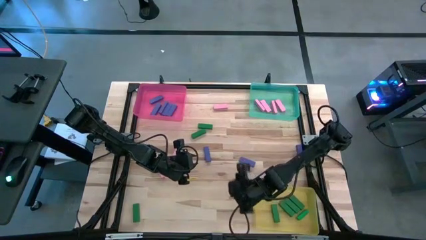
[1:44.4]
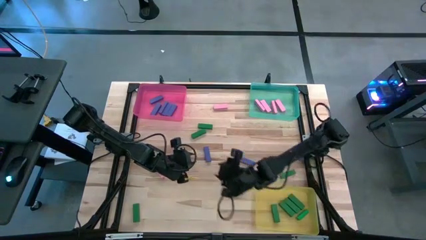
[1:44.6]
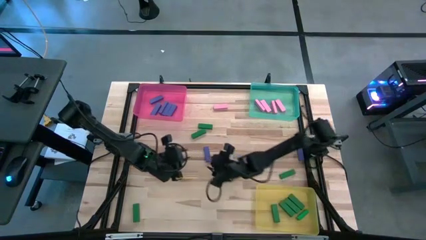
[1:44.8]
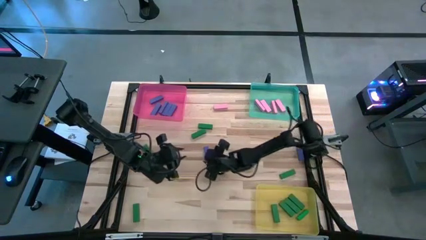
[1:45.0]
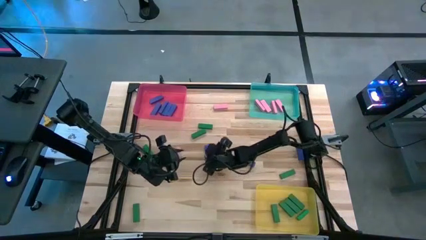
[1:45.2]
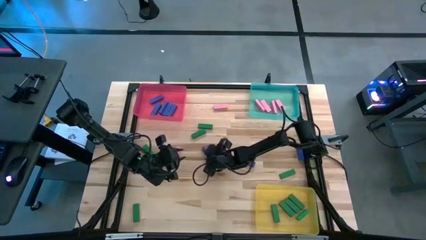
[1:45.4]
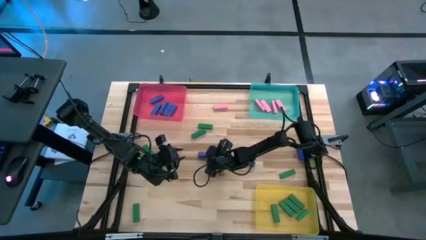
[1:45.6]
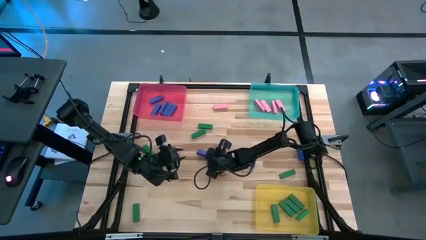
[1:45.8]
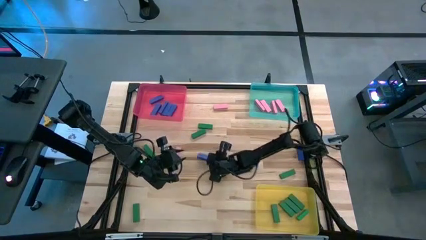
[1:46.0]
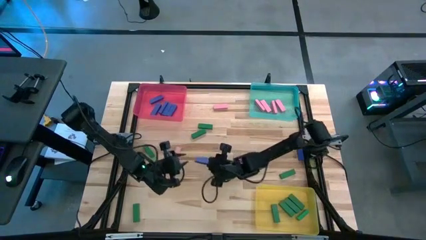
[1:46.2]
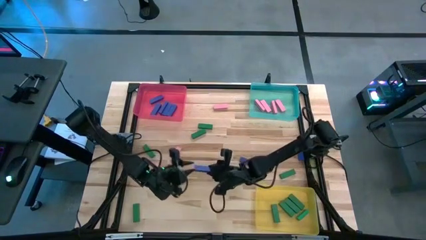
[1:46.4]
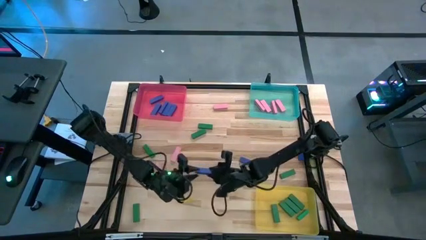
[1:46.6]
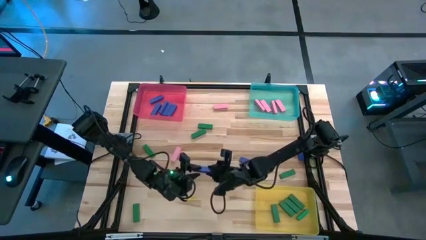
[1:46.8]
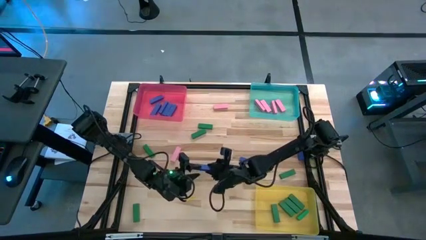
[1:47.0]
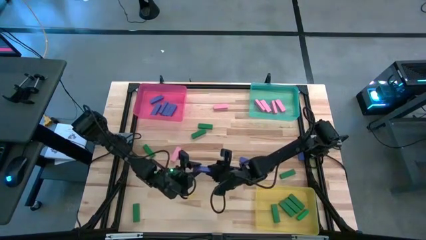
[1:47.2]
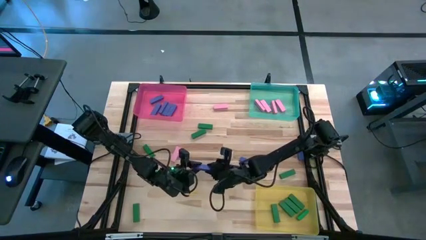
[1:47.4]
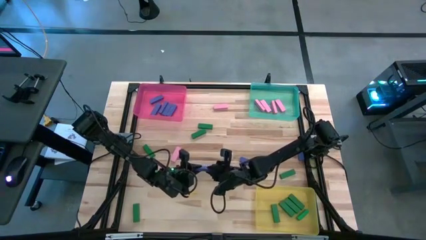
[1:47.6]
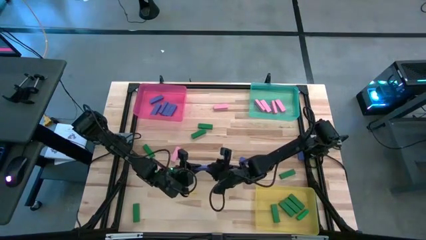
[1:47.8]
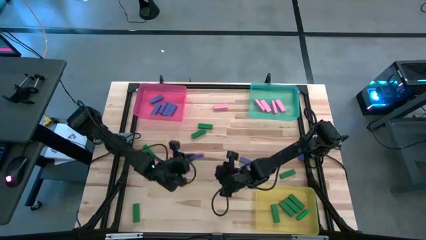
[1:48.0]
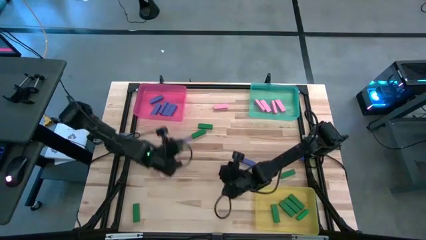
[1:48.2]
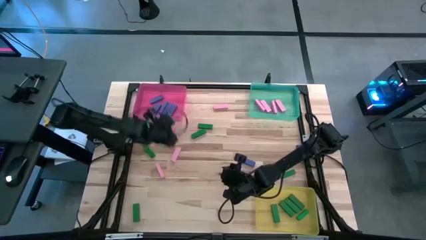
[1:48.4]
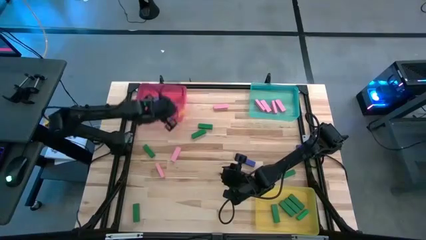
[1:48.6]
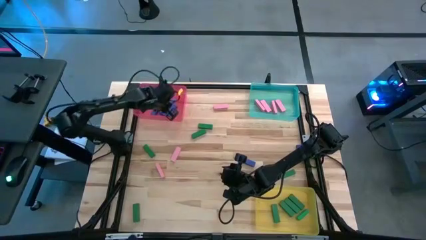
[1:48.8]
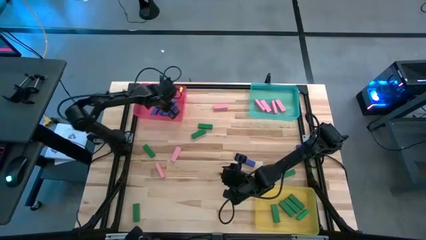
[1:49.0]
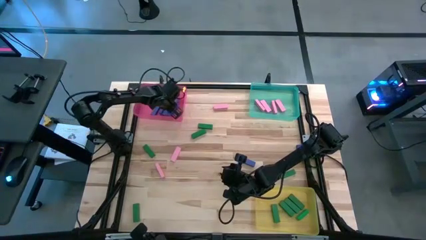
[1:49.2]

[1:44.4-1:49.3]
Task: Sort blocks
Put the blue block into the red bin

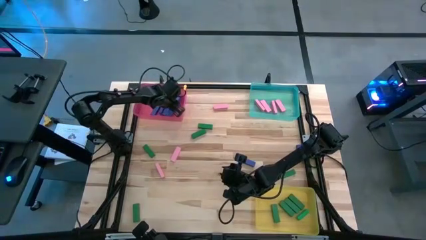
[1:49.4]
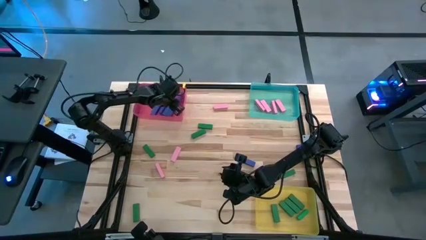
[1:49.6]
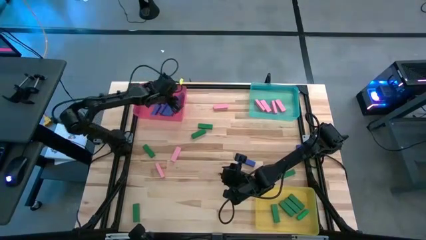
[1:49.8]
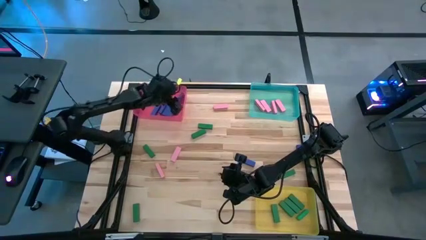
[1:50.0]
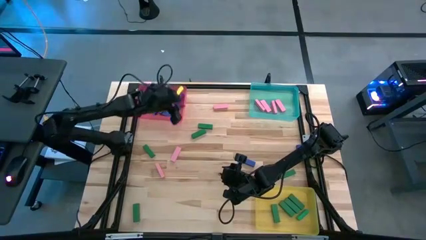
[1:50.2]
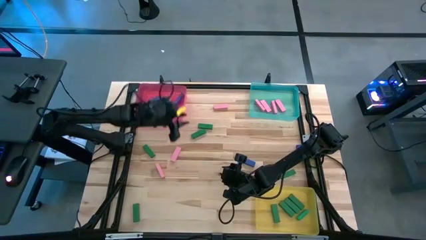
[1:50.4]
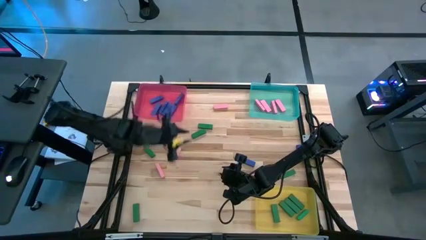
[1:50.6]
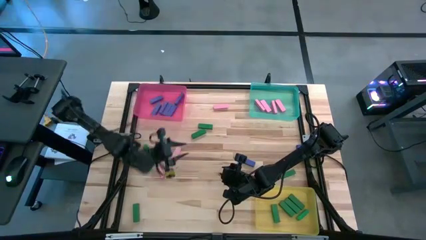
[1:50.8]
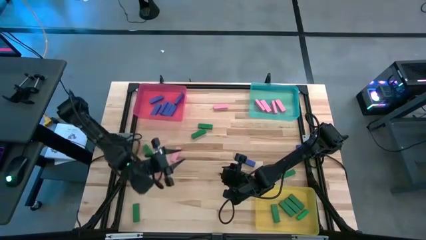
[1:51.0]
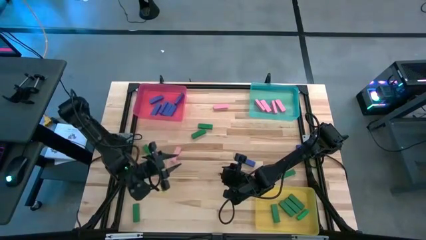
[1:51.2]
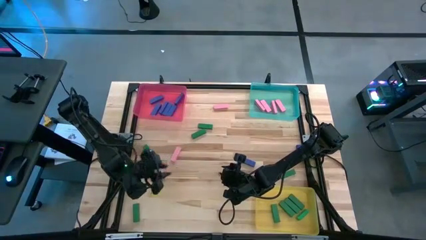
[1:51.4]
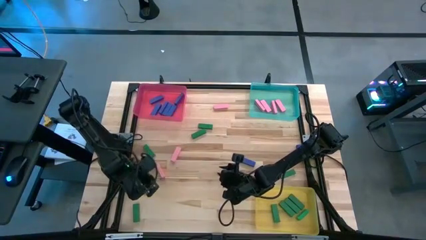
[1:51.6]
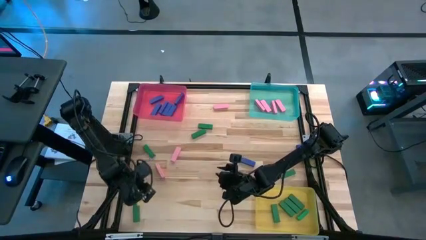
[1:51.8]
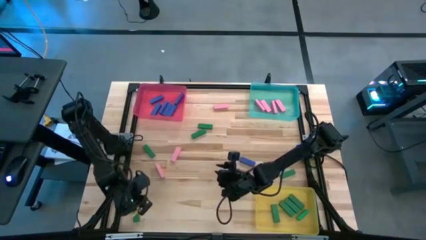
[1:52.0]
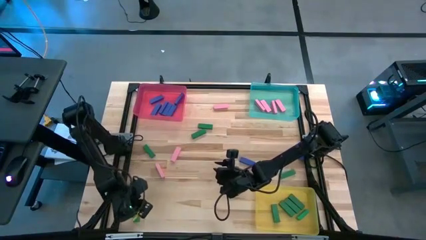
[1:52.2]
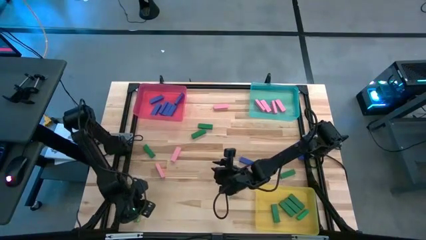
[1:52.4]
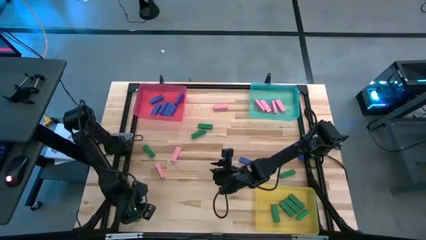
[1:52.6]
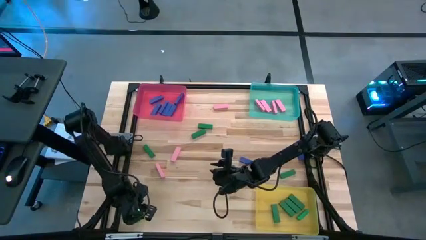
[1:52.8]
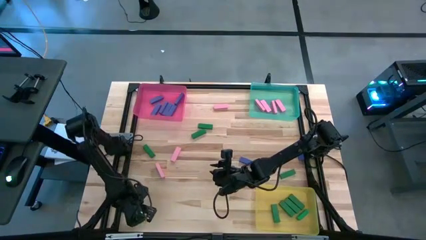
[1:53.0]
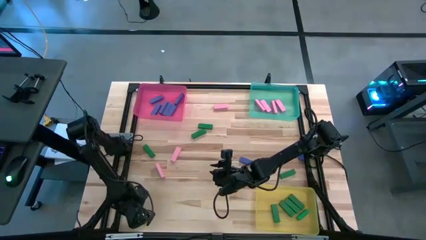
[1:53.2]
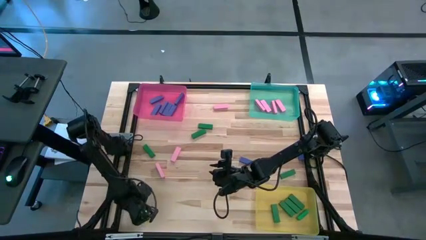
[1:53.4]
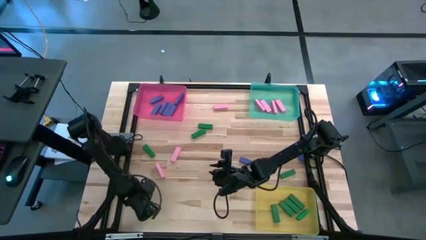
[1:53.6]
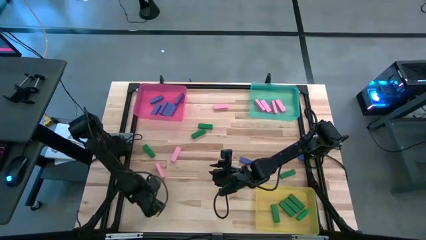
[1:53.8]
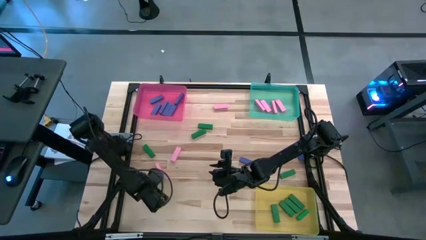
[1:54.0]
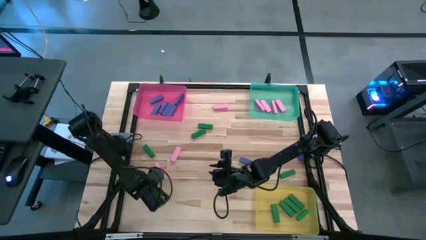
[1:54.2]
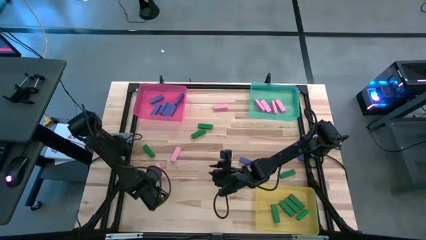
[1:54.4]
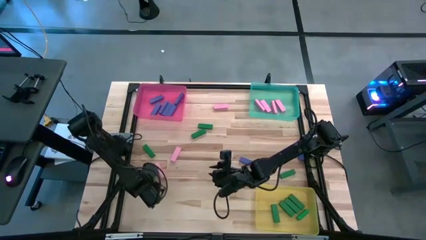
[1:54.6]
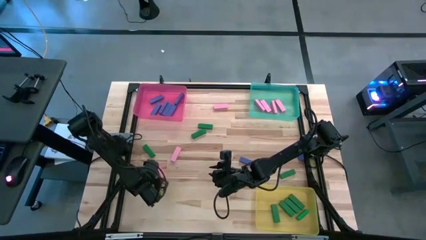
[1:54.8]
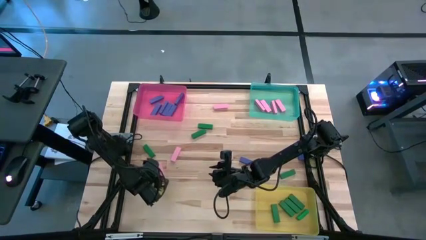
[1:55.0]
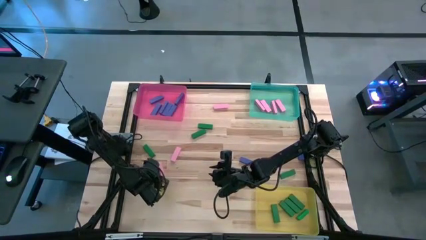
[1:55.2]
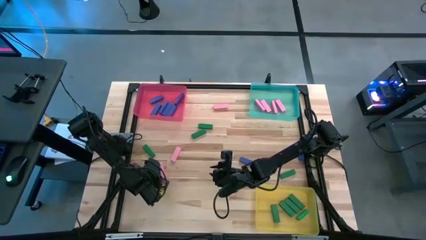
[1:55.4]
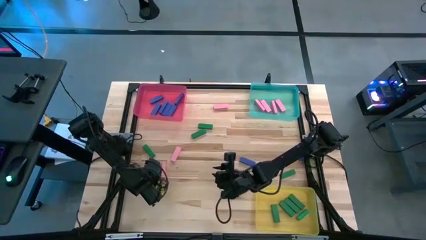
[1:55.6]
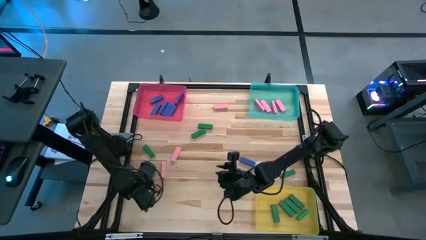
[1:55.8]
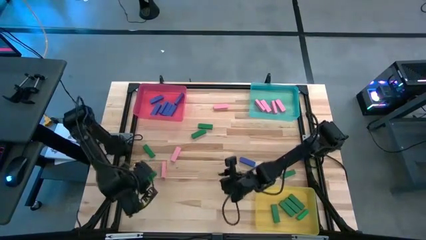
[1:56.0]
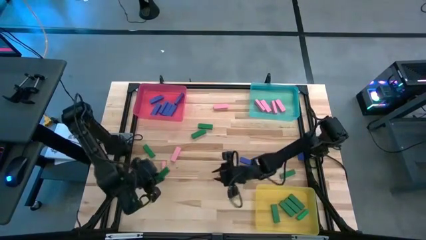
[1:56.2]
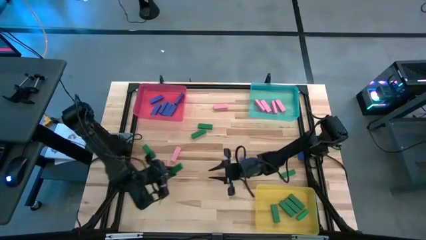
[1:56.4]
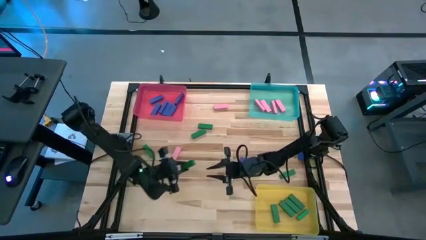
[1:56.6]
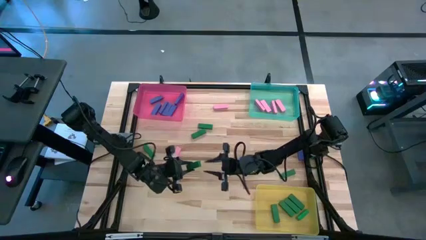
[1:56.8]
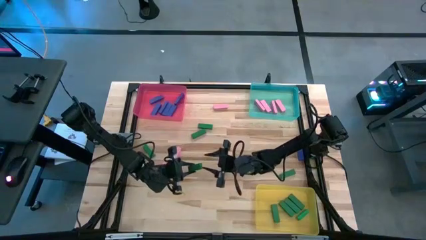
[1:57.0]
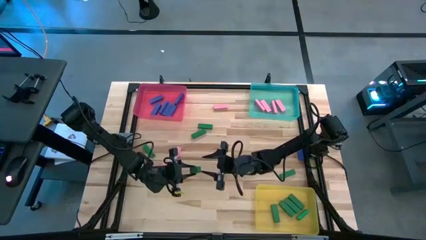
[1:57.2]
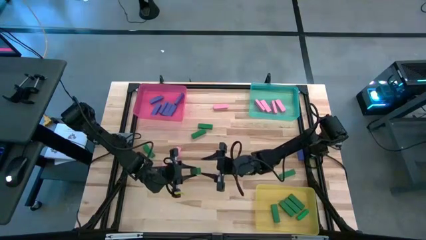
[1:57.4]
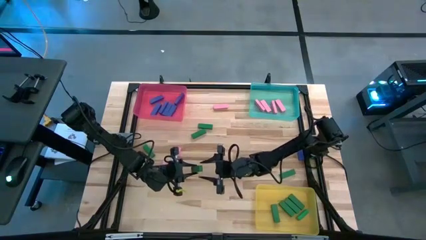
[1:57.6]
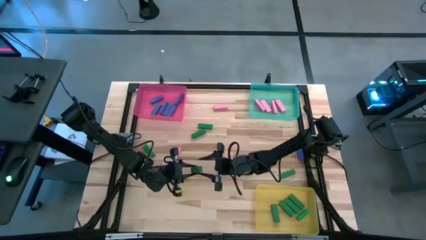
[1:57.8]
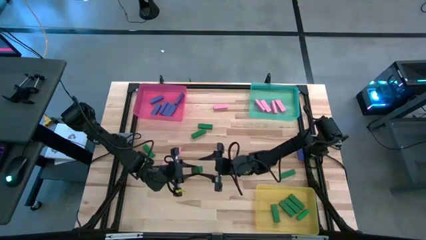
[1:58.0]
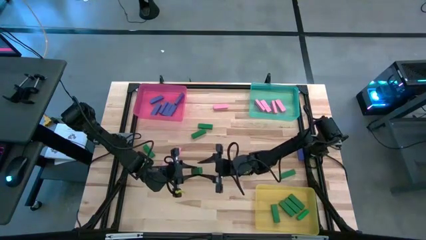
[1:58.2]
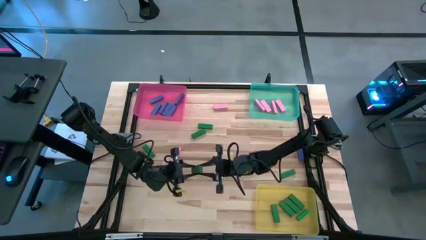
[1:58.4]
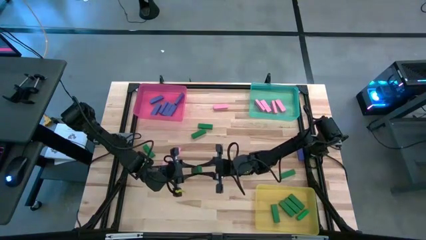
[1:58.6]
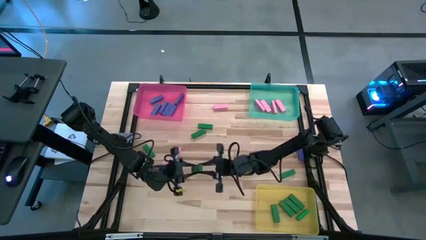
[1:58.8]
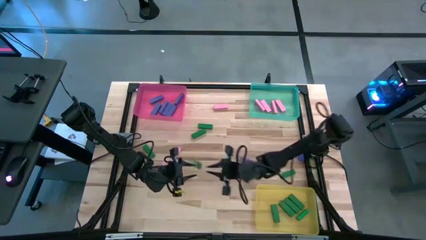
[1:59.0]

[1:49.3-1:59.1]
Put the green block into the yellow bin

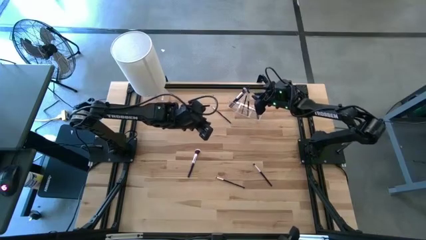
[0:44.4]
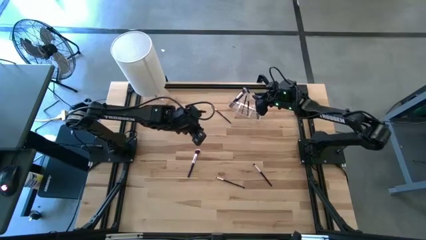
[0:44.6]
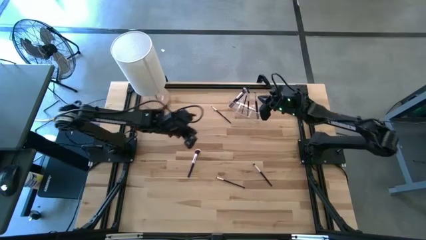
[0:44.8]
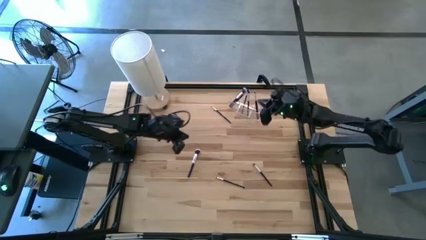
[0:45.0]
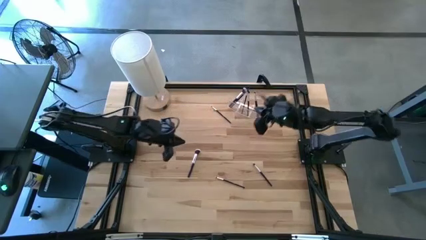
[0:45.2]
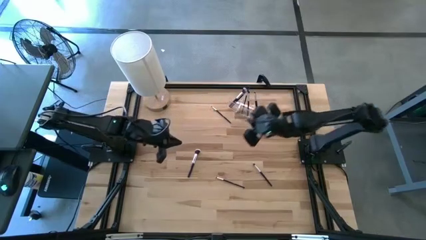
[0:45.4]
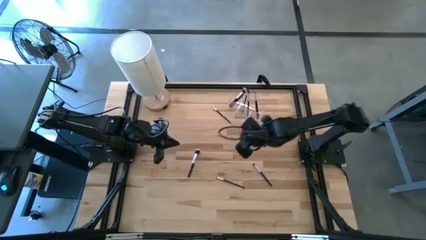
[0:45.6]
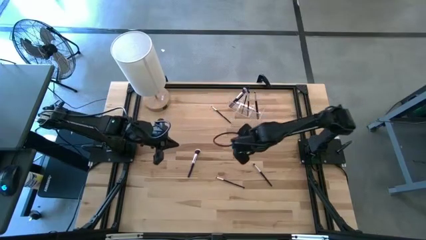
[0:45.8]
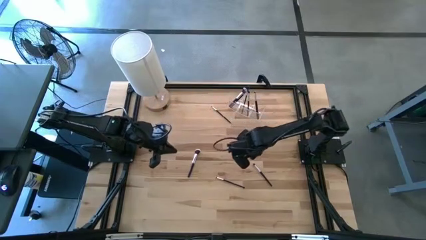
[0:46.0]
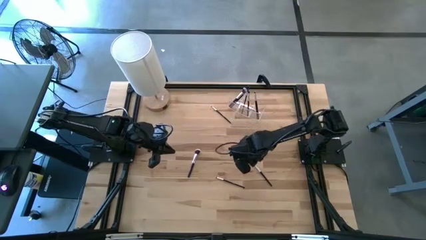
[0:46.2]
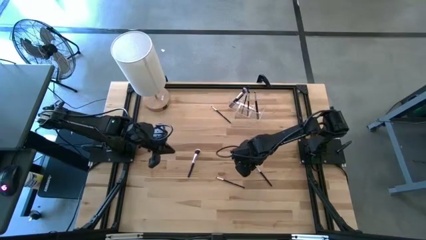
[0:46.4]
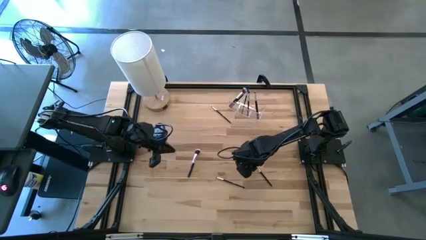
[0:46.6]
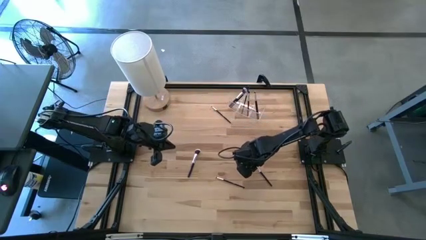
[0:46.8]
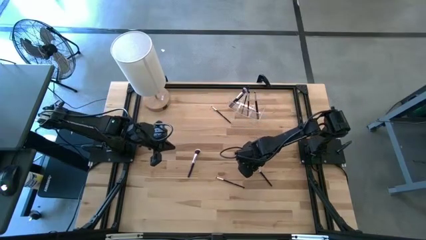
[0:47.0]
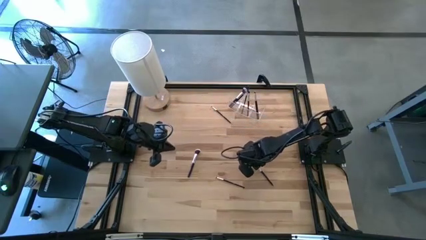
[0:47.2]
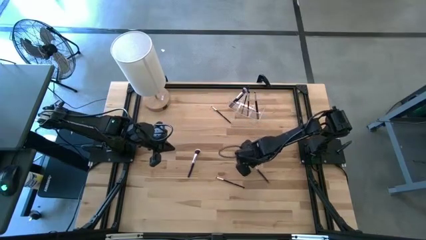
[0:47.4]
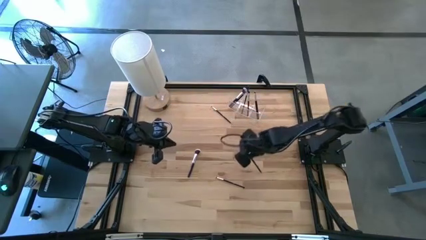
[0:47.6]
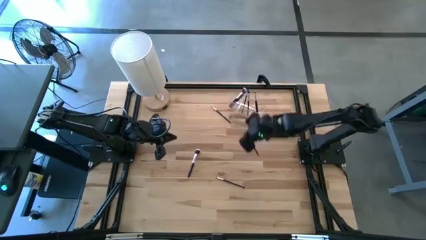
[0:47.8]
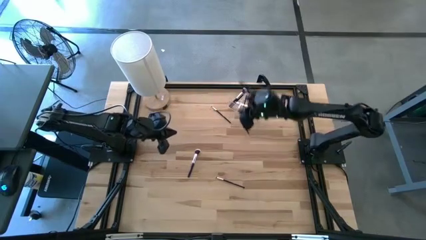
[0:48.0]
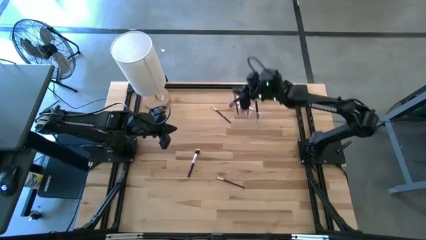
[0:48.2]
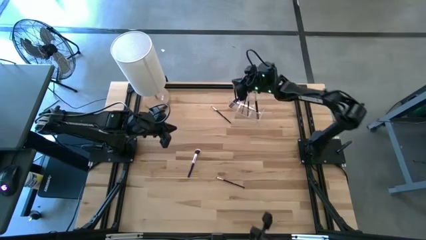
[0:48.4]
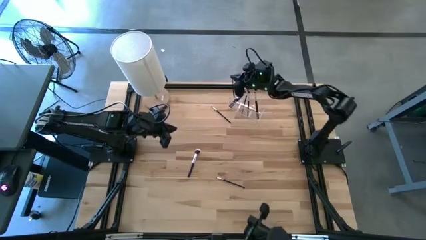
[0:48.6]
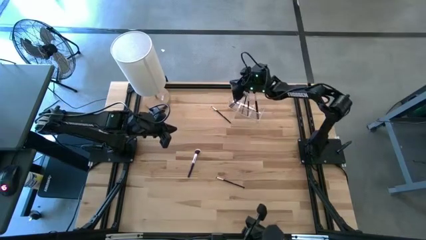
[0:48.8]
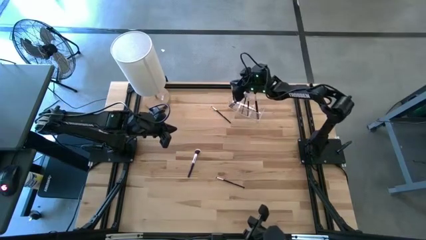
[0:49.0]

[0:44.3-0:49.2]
Task: Pick & Place Makeup Brushes
Put the black makeup brush into the transparent organizer
